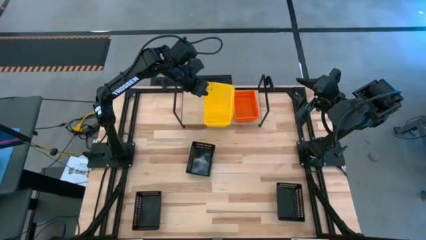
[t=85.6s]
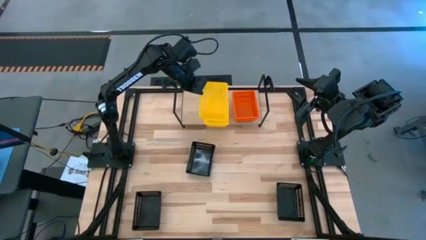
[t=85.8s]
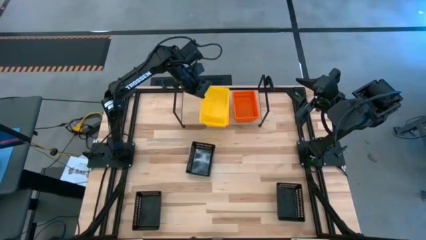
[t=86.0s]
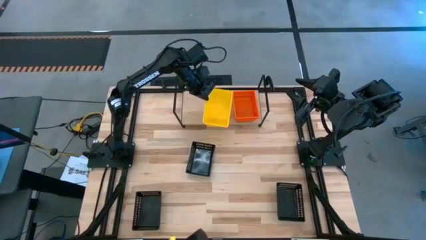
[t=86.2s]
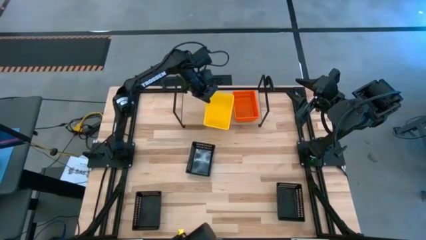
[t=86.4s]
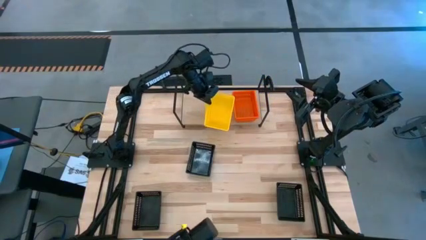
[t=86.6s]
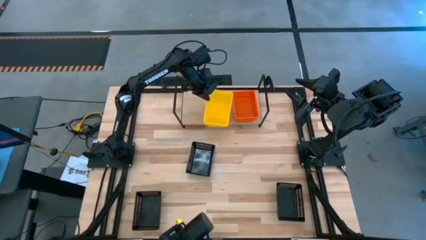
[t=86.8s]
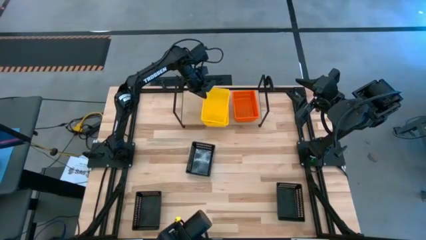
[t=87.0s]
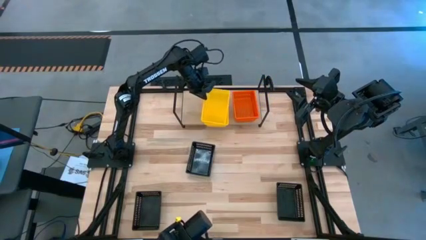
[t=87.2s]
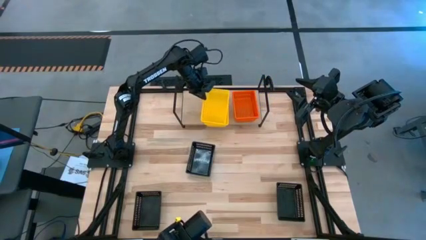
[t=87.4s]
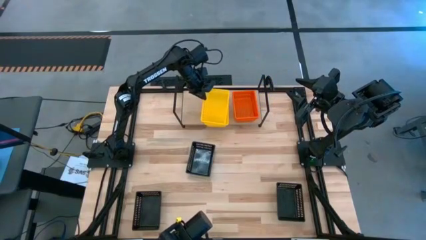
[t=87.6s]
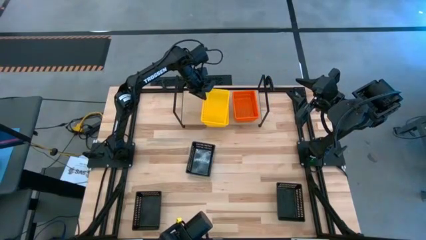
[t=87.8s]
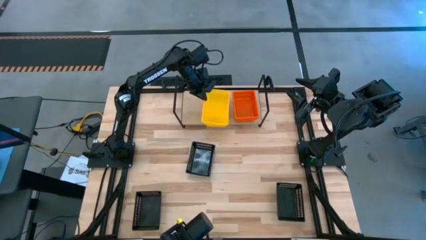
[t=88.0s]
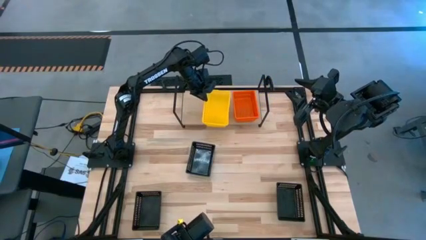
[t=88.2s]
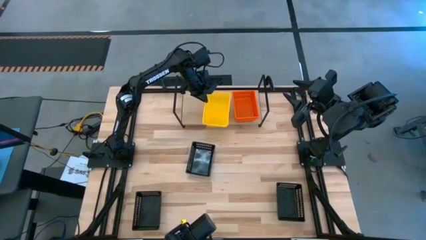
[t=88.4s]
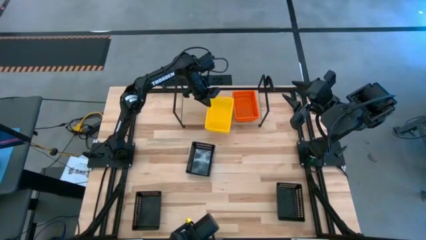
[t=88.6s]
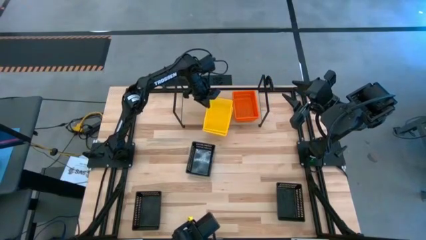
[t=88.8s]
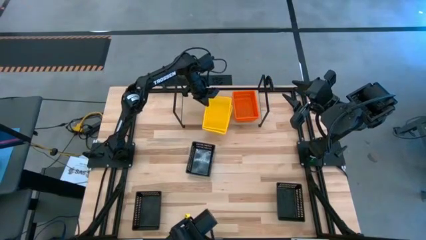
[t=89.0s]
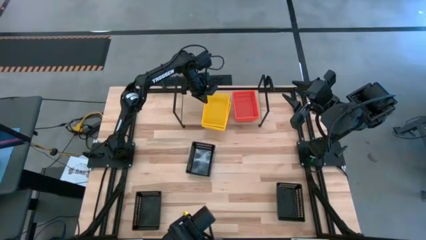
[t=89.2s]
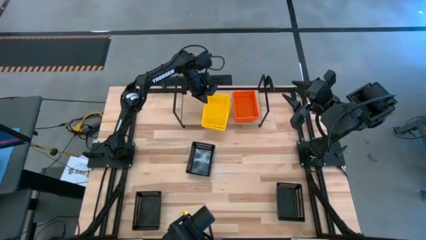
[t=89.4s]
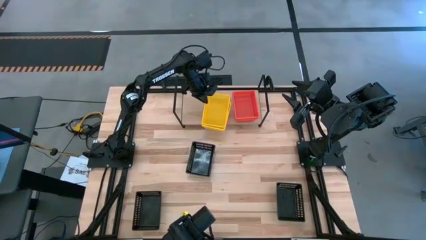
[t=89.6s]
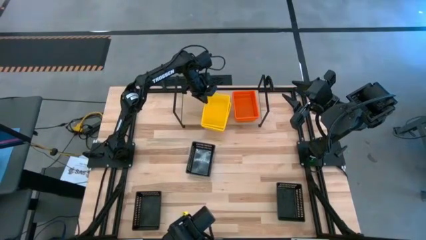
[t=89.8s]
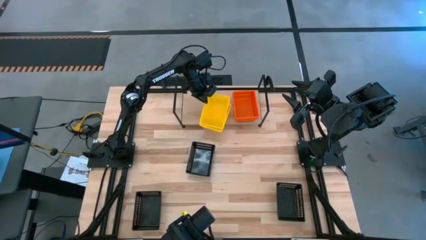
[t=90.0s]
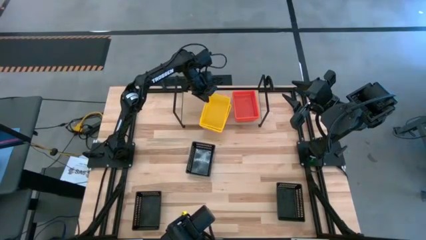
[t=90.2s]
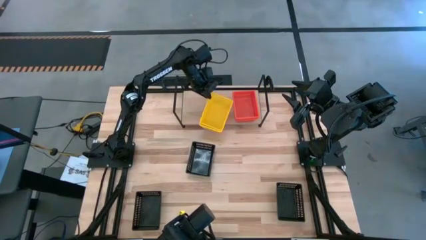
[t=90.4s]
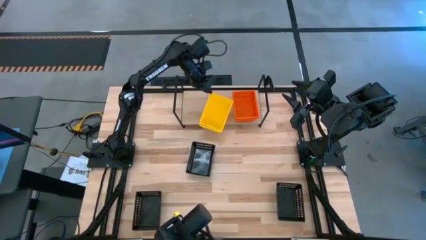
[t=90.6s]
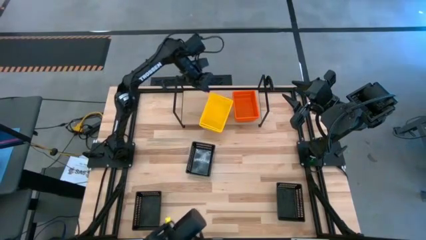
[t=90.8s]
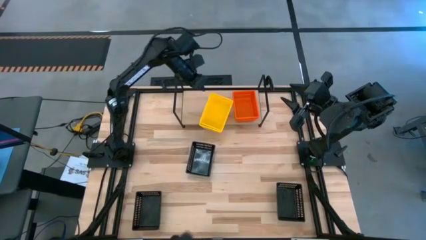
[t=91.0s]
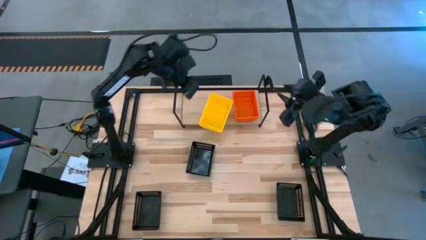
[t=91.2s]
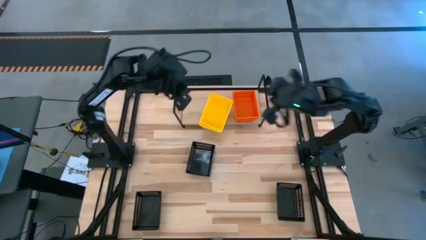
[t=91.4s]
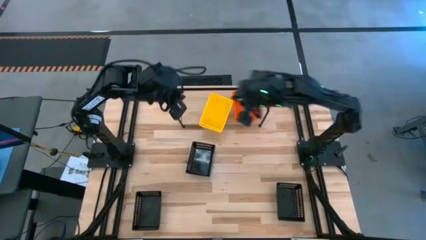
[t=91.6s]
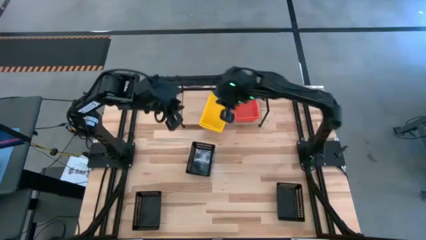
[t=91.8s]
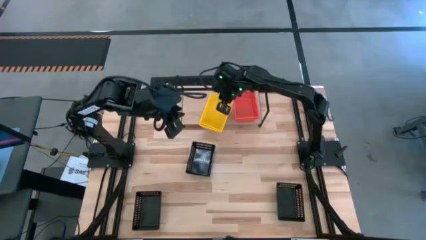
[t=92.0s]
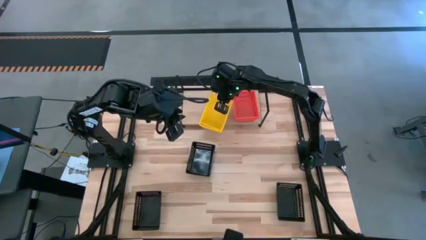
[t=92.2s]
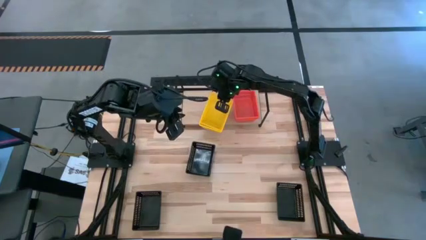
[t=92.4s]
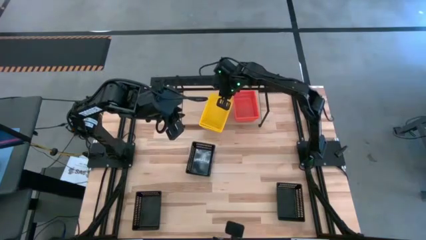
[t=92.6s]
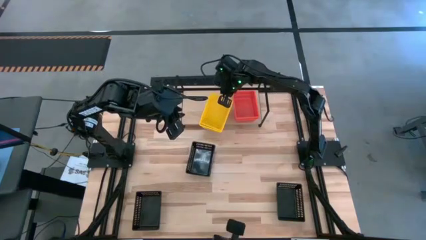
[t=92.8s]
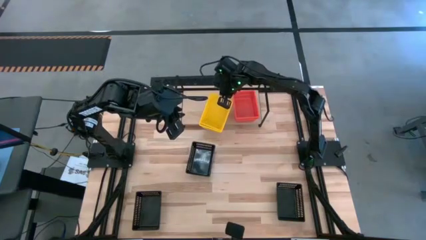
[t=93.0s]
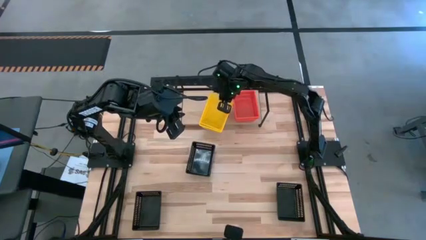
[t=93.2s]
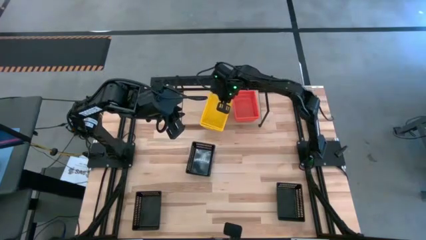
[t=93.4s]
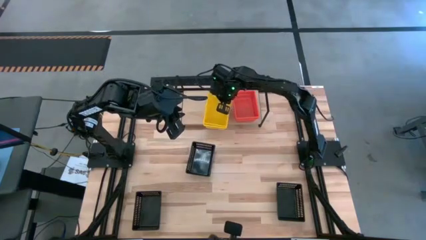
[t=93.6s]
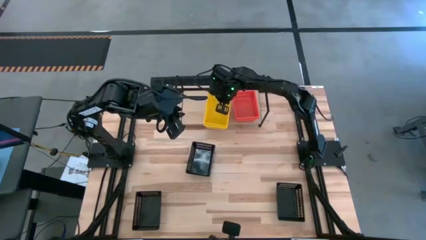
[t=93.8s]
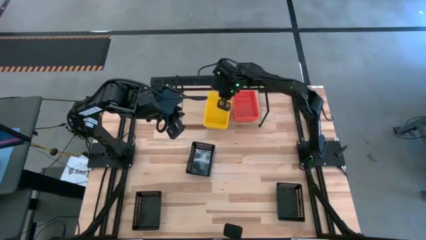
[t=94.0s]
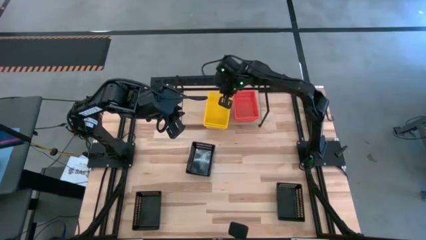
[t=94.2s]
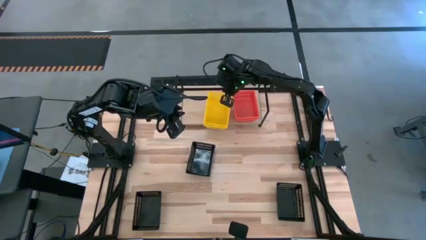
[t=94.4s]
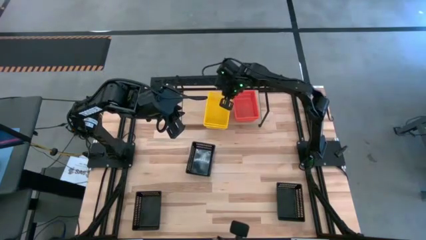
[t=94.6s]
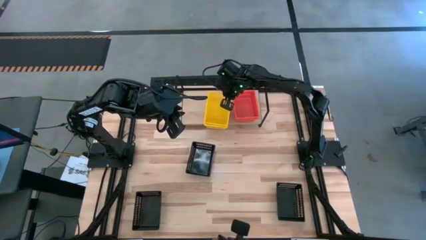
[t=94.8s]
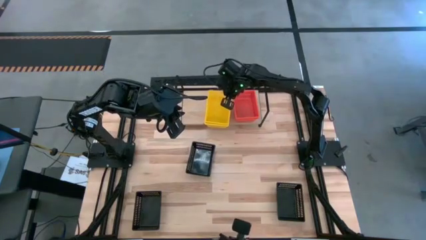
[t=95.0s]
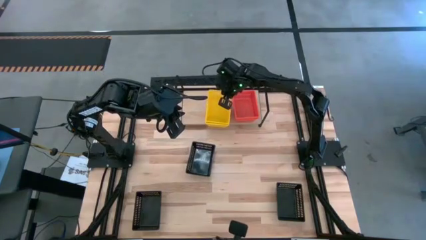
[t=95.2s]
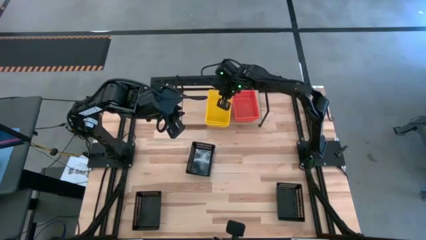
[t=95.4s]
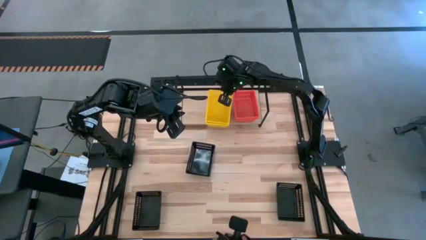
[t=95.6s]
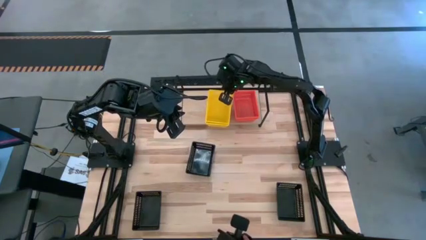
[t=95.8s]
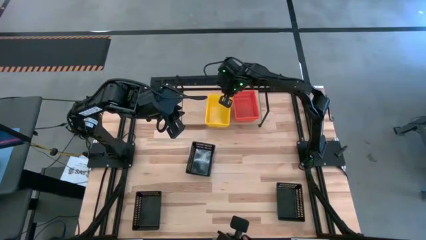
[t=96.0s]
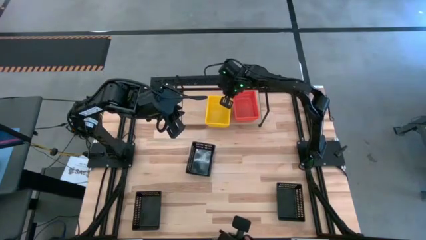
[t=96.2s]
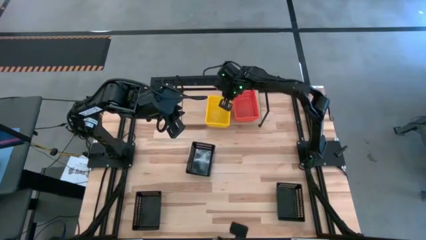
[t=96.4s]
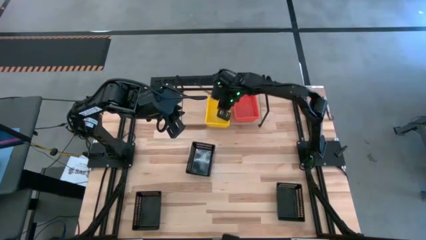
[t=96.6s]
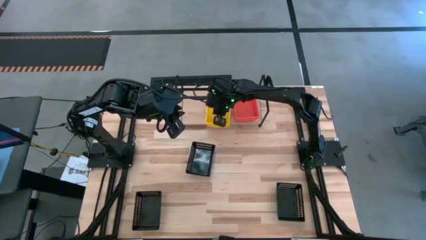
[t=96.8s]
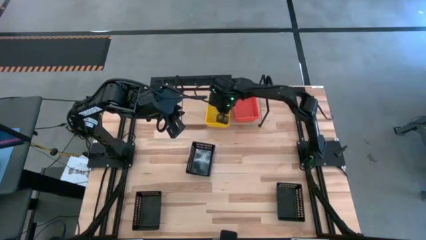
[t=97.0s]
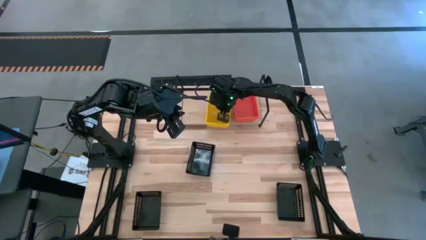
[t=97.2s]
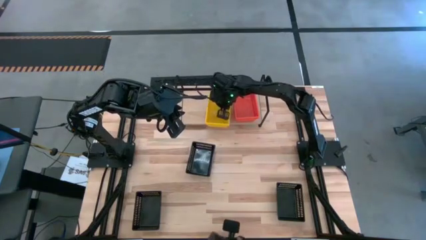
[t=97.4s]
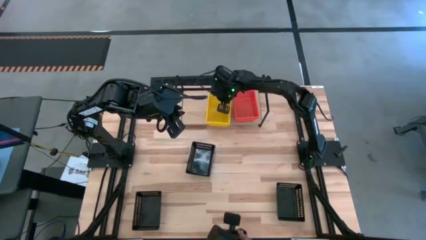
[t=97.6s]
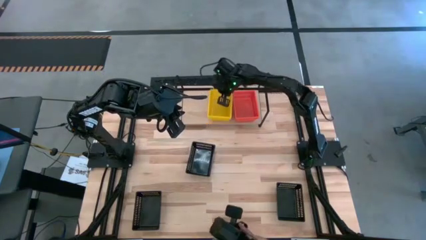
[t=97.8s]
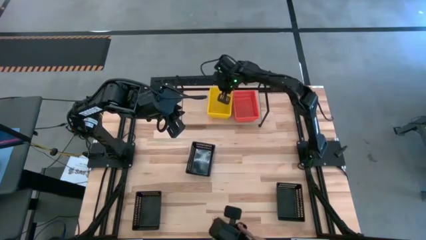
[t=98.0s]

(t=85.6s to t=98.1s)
Task: Stack baskets on shelf by color
Stack the yellow bin on top of the other stacked yellow bins on the shelf

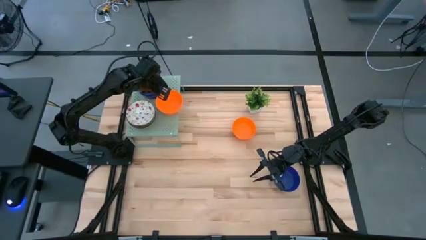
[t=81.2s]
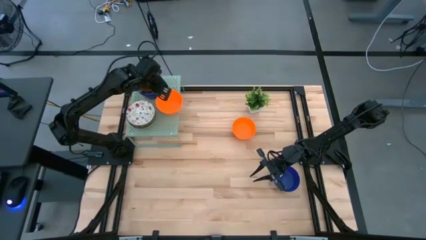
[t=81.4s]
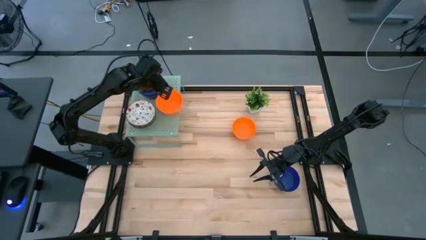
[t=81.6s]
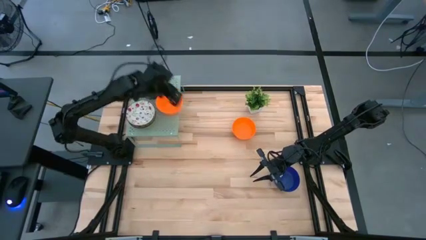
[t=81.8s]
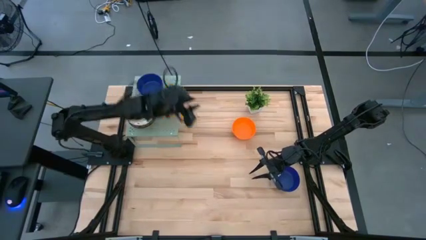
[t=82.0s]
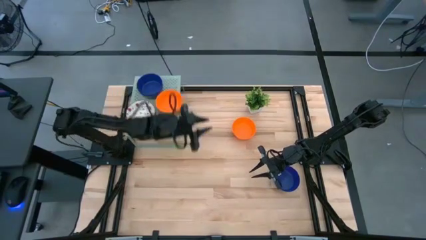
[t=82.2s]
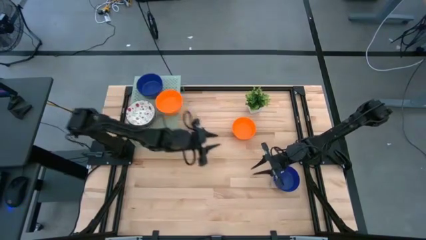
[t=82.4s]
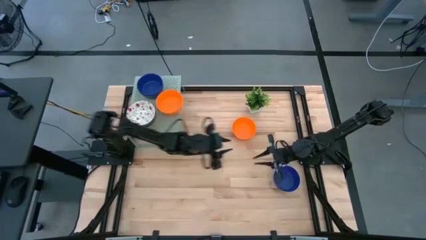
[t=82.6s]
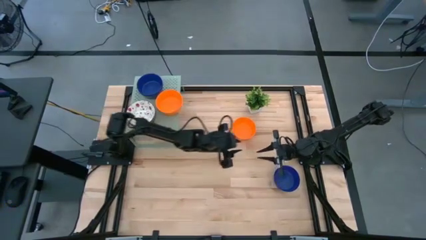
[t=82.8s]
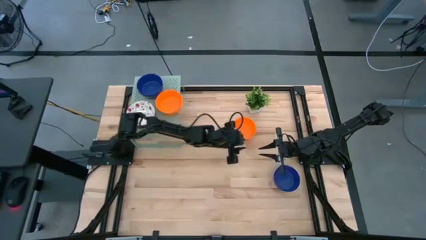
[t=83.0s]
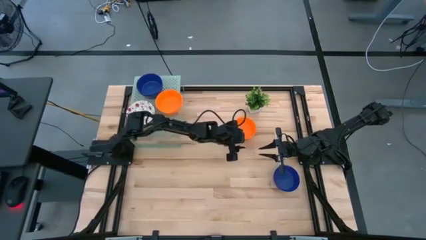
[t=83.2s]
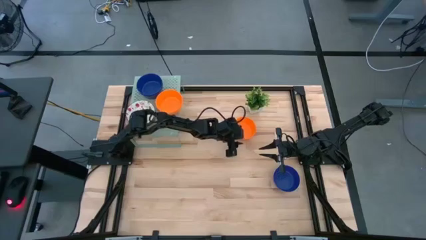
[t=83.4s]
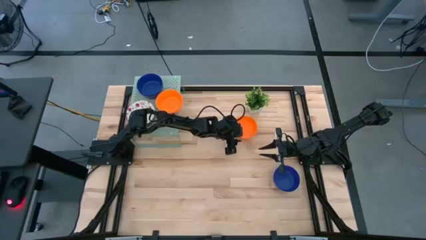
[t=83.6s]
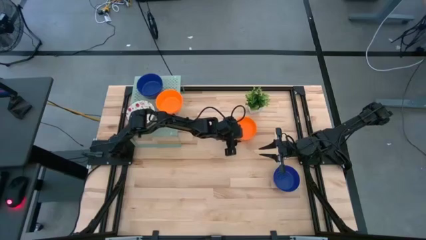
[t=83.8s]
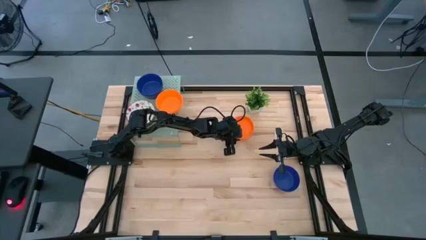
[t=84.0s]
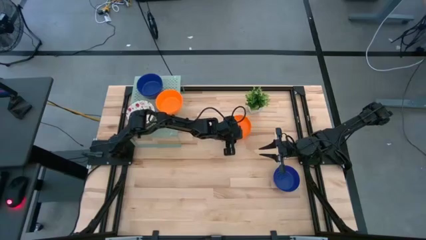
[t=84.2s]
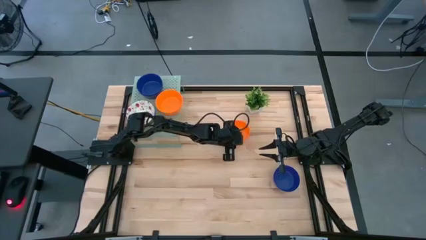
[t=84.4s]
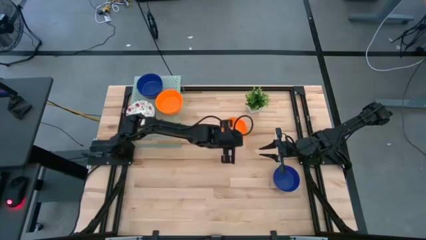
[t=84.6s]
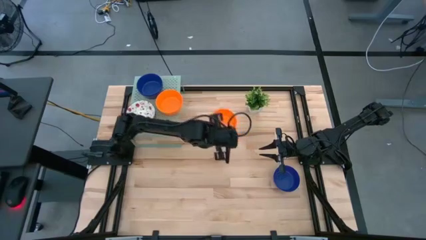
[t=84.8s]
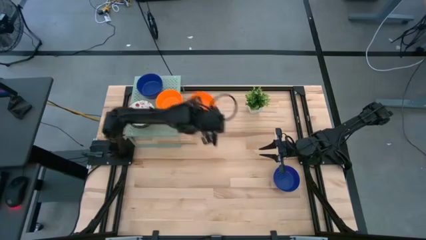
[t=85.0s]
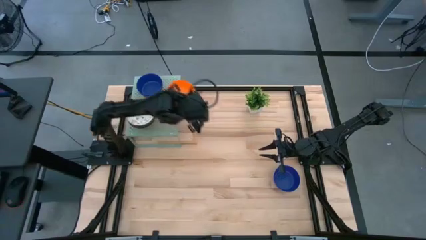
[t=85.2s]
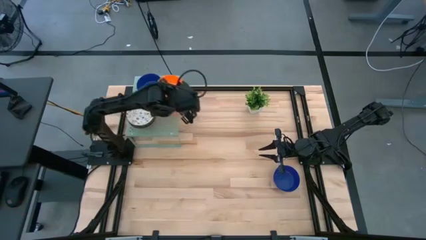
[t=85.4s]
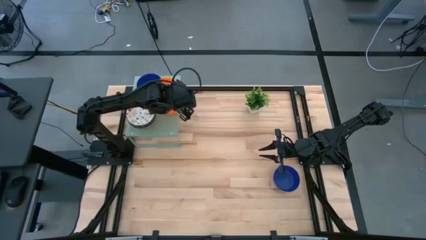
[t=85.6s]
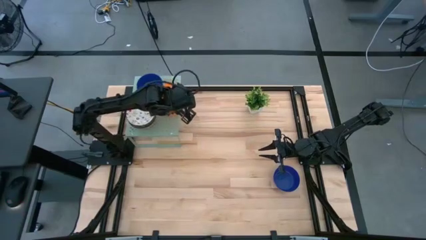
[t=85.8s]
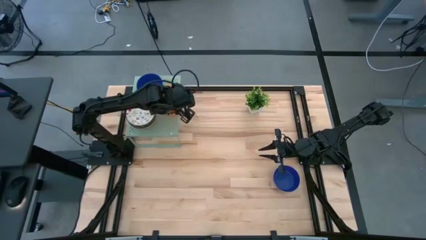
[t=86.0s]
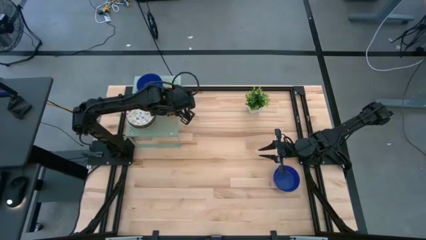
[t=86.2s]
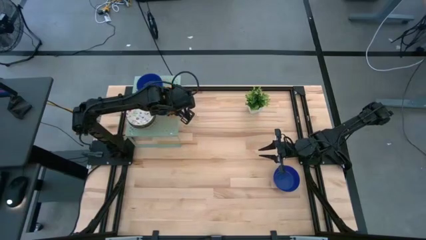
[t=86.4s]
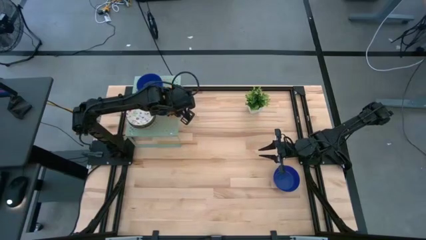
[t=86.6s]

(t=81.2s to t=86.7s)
Task: Pick & Place Mini bowls
Stack the orange bowl on the orange bowls on the shelf
